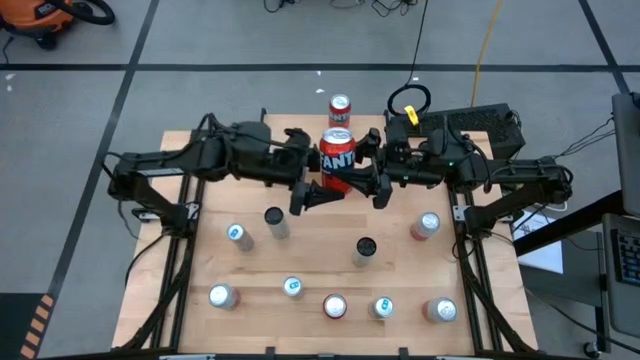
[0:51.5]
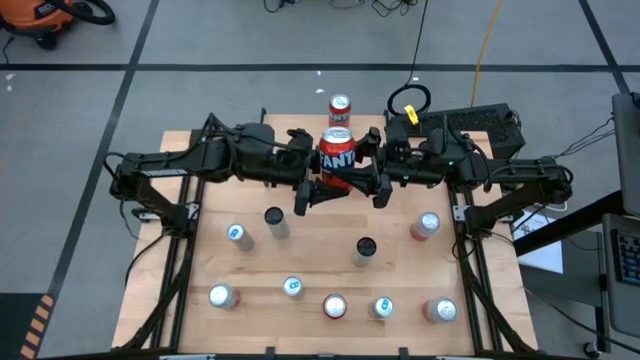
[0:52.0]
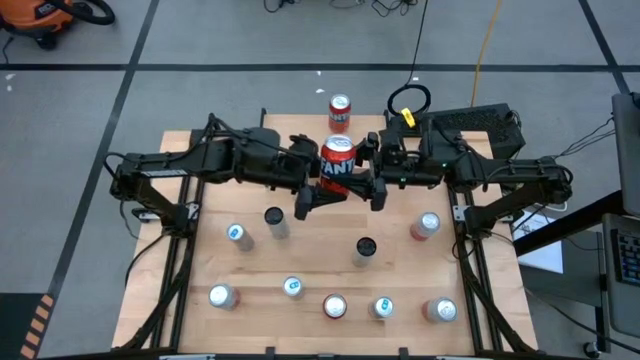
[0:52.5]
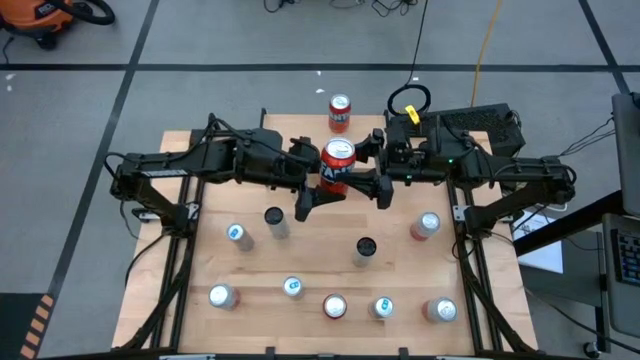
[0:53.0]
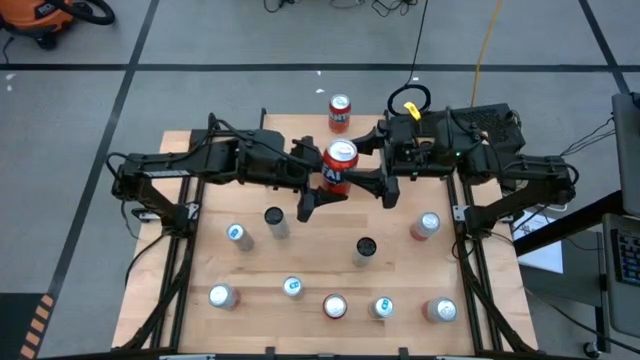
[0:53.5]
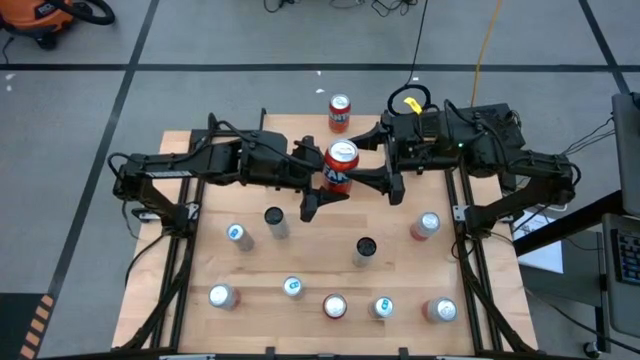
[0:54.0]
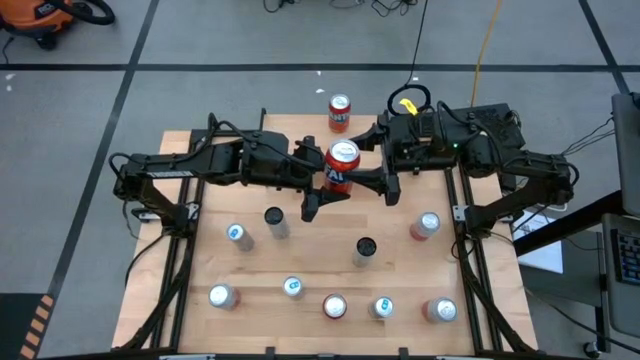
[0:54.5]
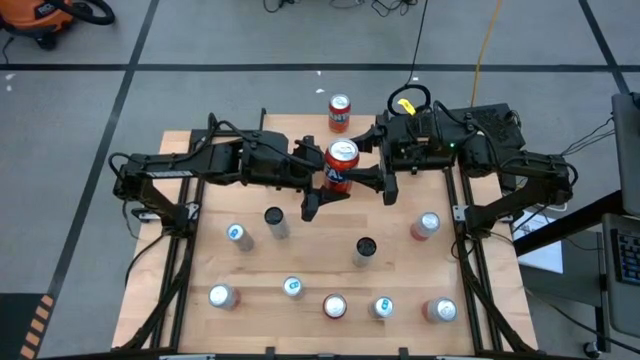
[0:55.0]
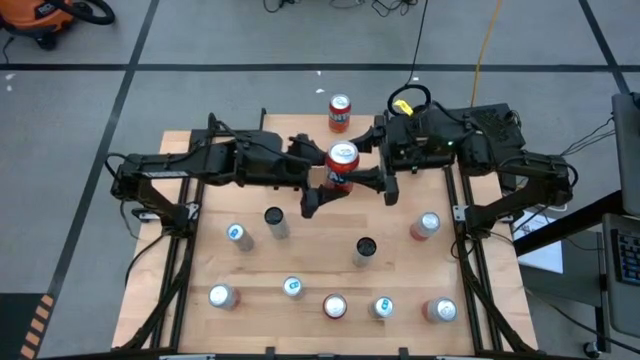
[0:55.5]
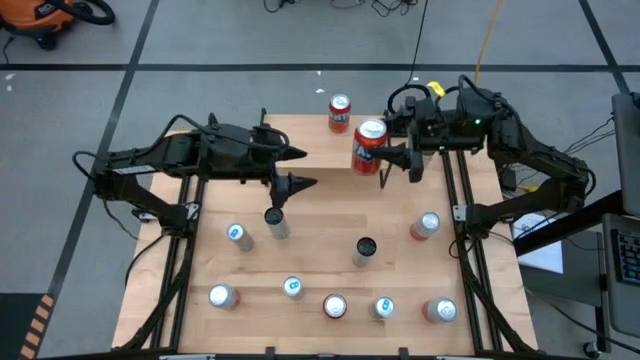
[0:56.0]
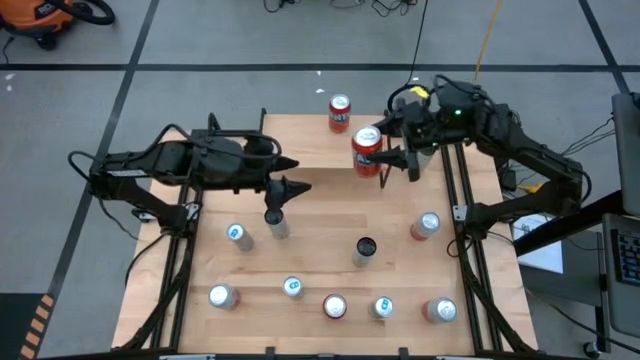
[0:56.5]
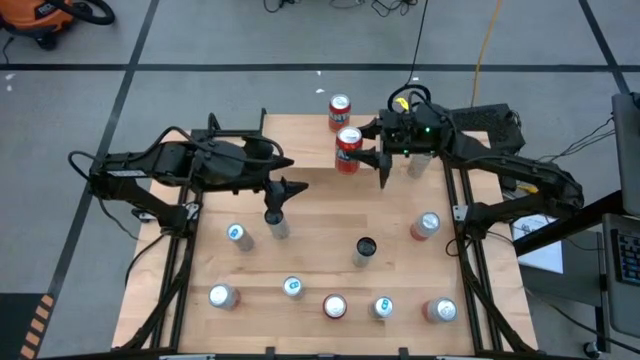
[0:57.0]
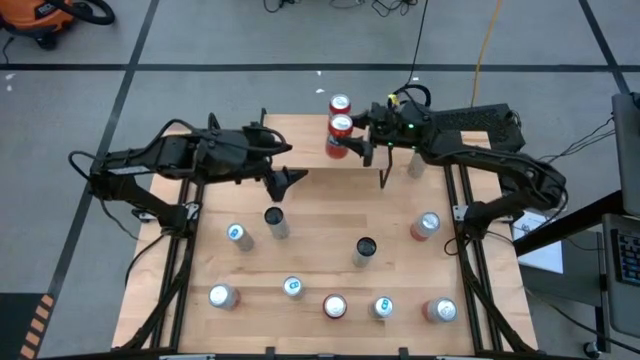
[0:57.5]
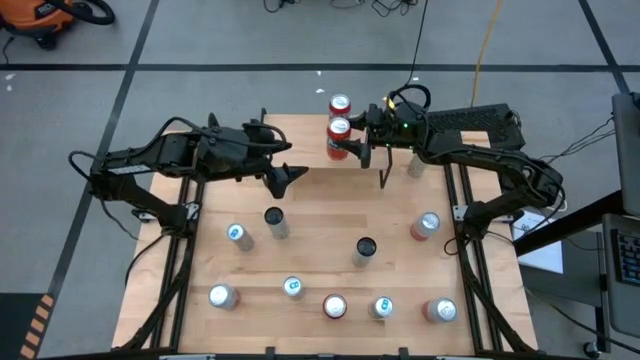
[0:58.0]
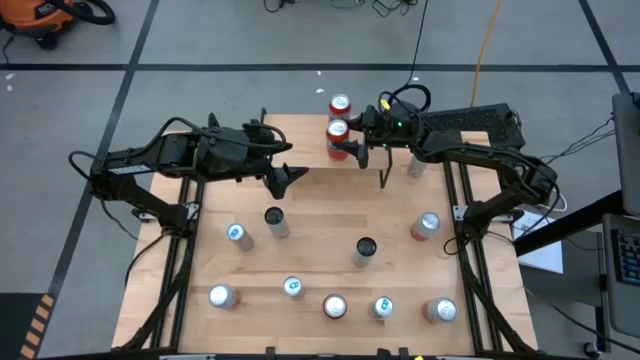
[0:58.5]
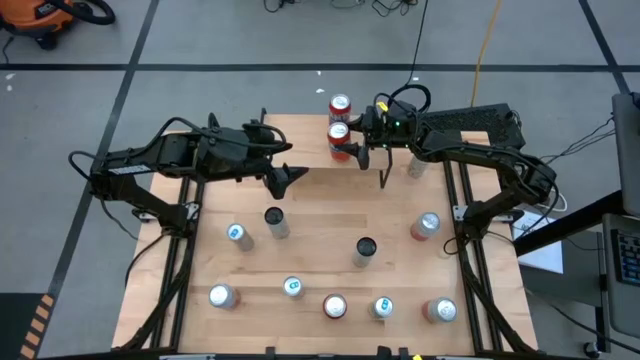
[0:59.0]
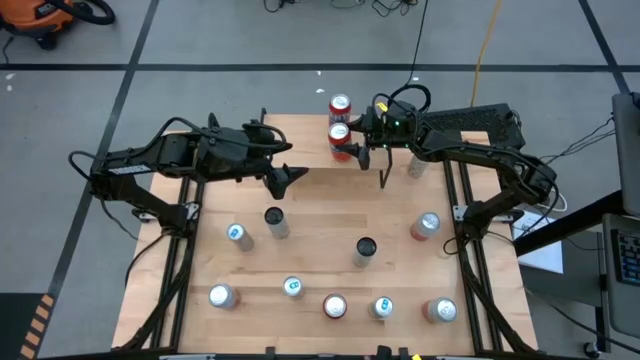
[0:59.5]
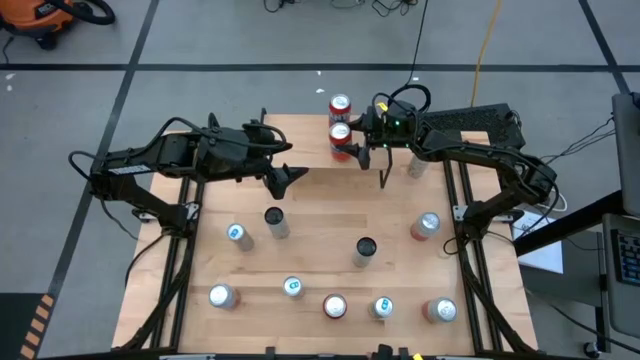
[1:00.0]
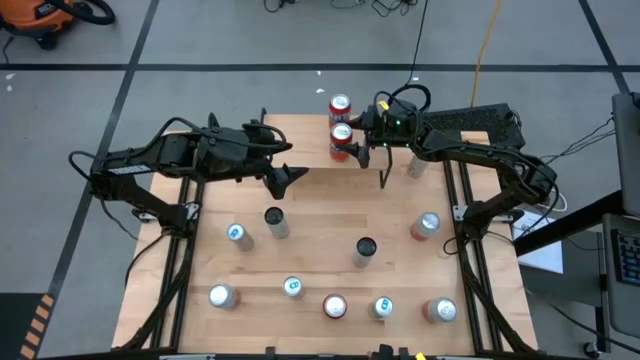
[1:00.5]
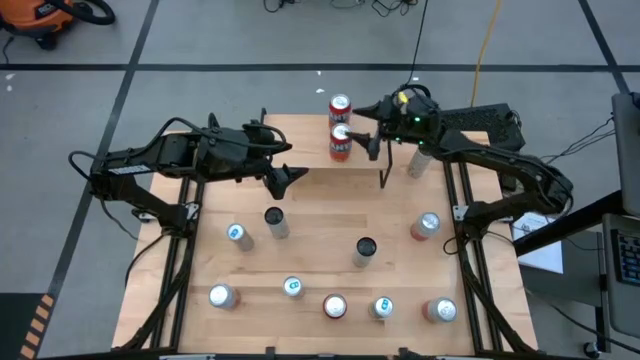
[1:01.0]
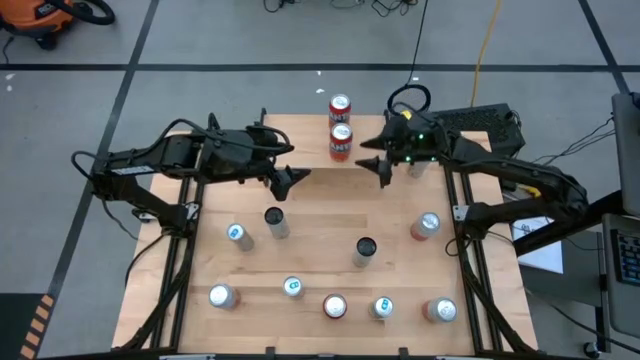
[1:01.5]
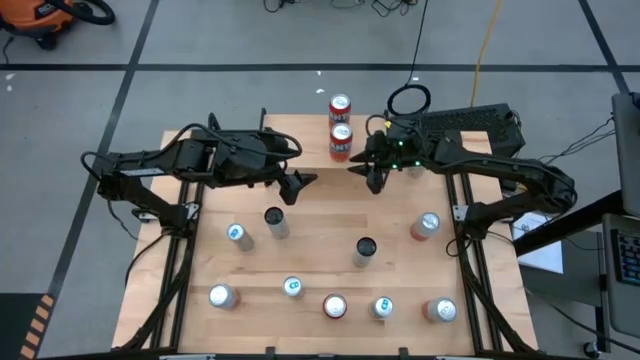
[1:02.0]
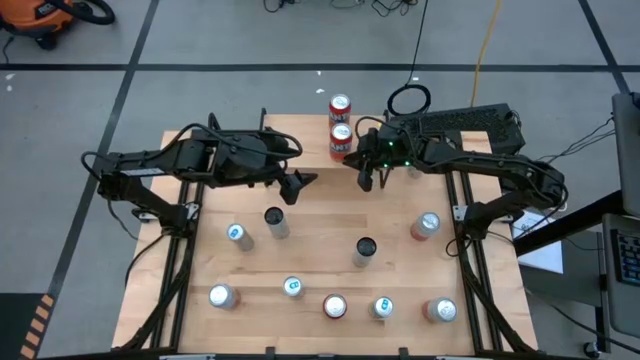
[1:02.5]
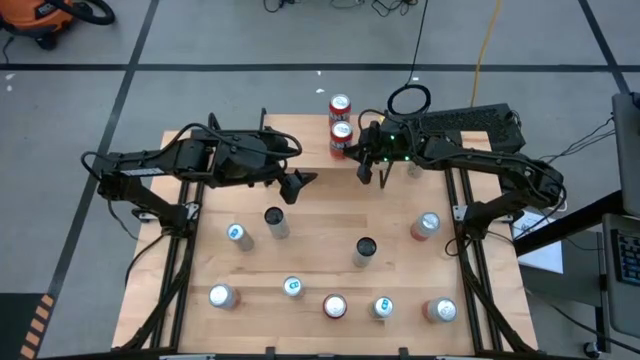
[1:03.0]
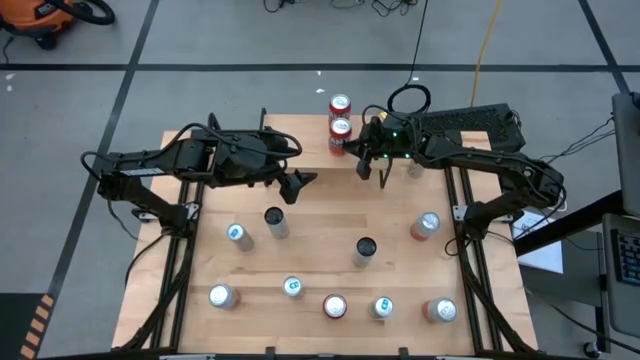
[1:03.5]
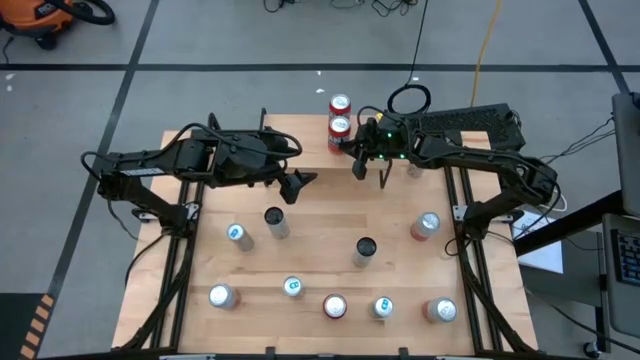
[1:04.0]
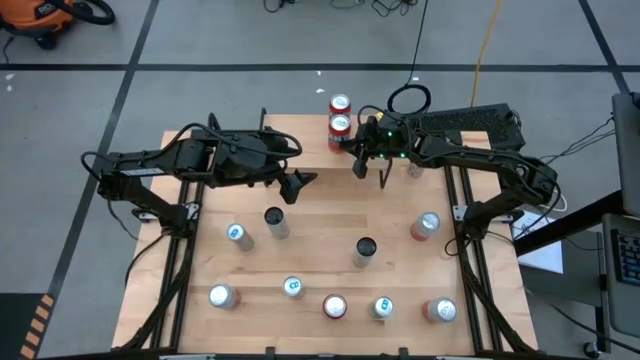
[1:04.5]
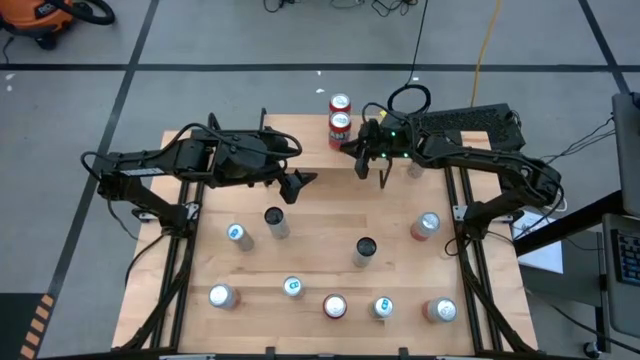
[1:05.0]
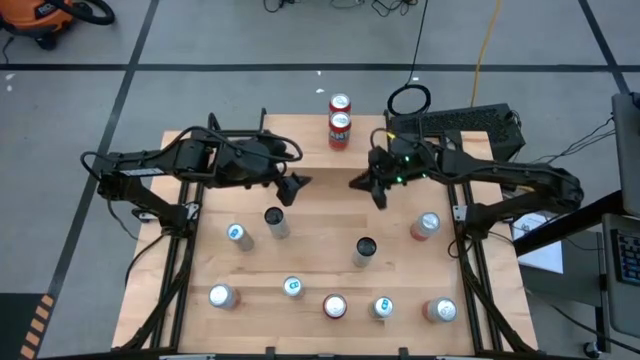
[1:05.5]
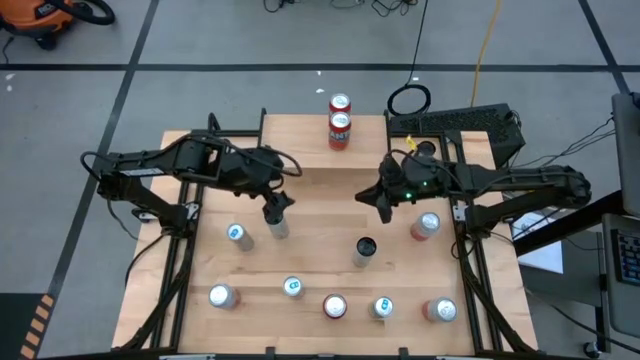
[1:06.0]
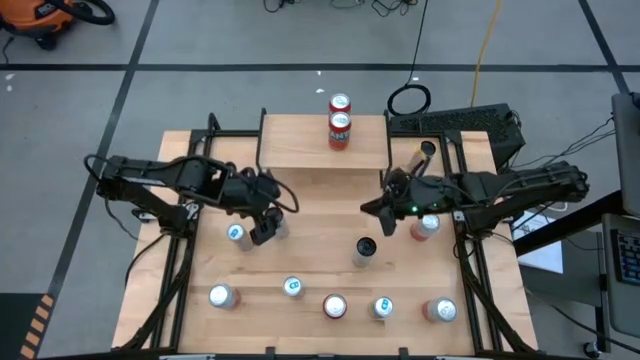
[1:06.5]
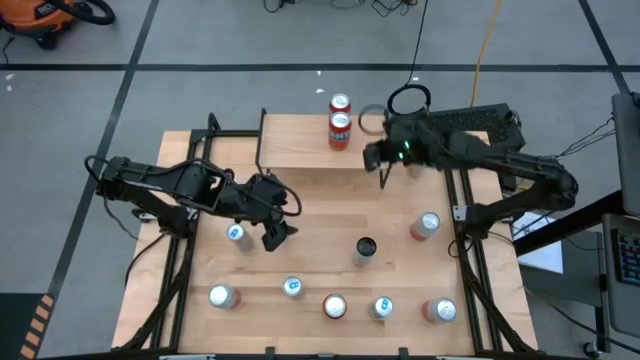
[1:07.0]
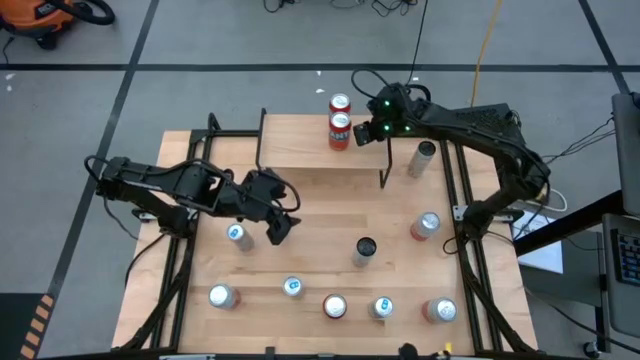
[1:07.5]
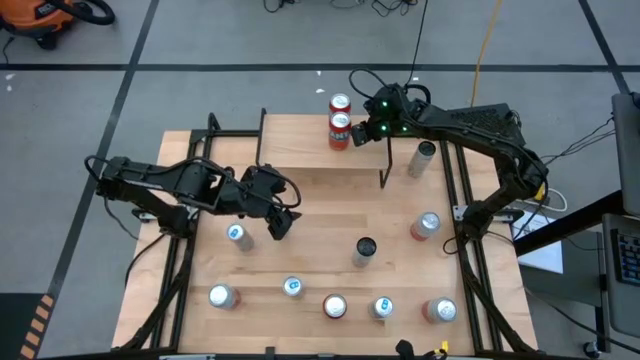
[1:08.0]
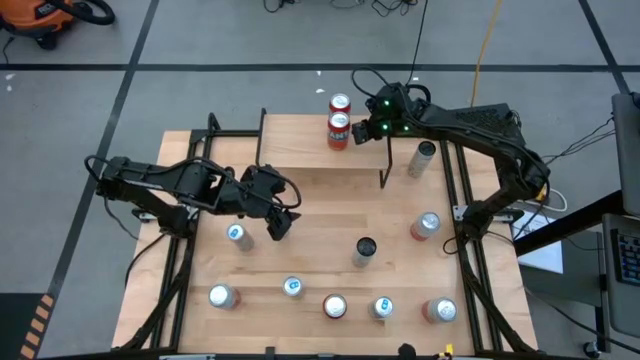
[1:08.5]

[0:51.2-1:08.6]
Task: Place canned beverage on shelf
Put the top orange soda can aligned with the other orange soda can on the shelf
